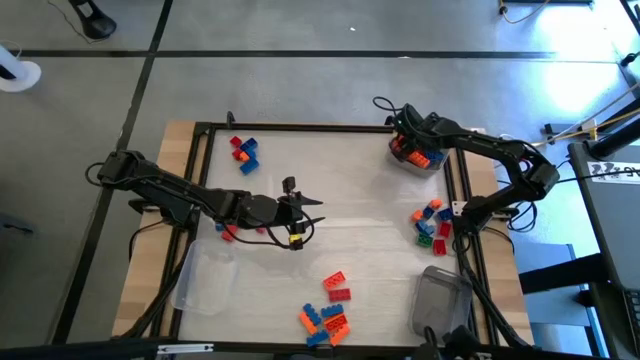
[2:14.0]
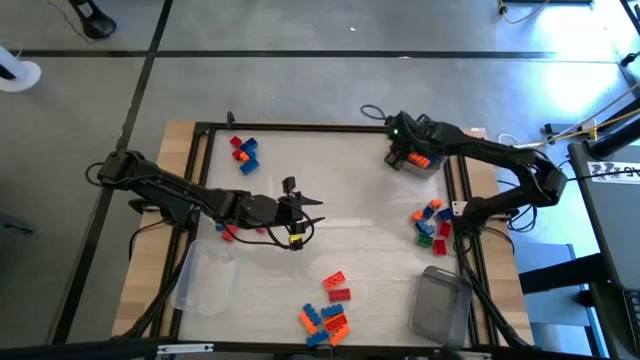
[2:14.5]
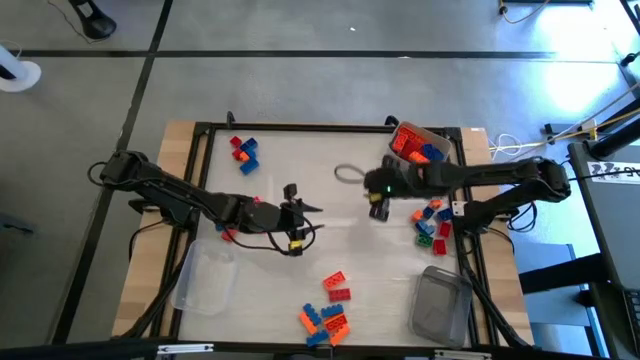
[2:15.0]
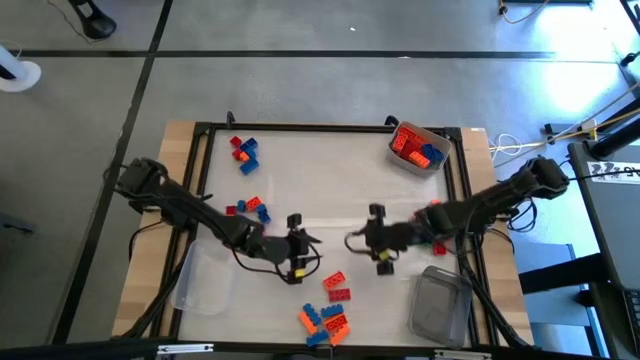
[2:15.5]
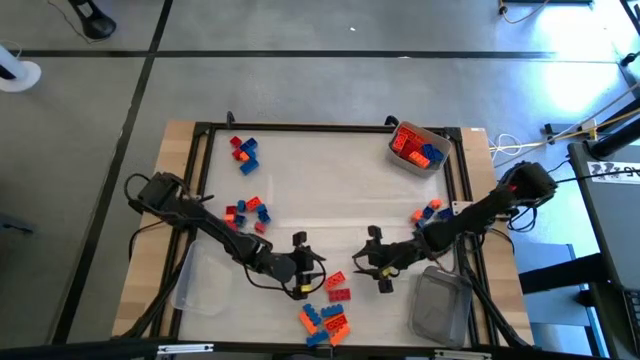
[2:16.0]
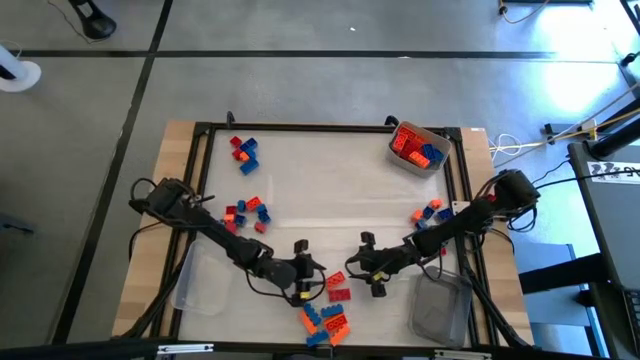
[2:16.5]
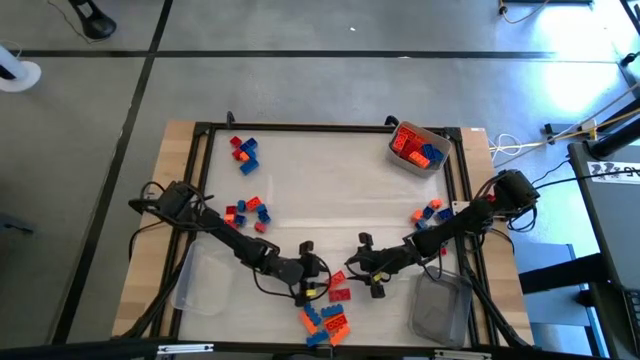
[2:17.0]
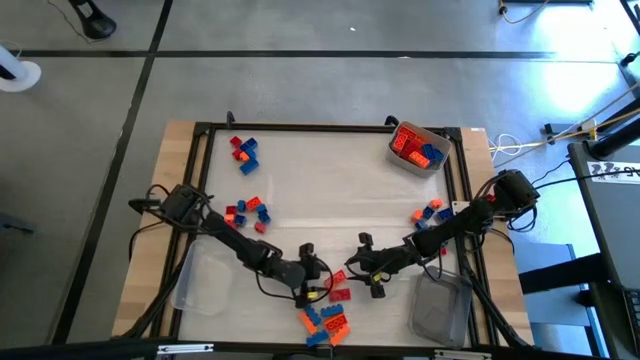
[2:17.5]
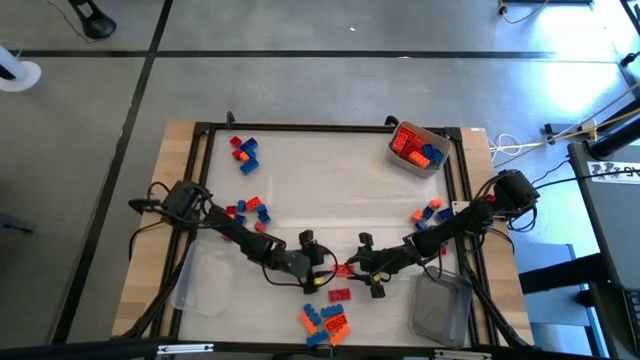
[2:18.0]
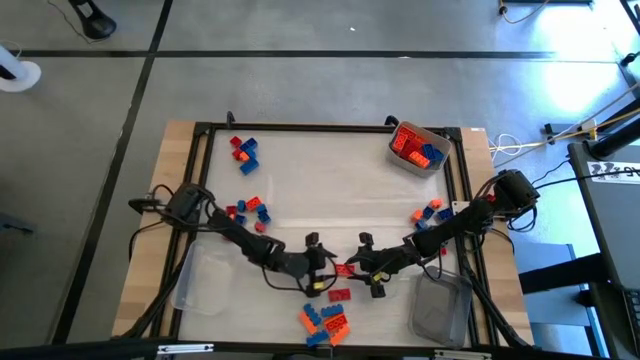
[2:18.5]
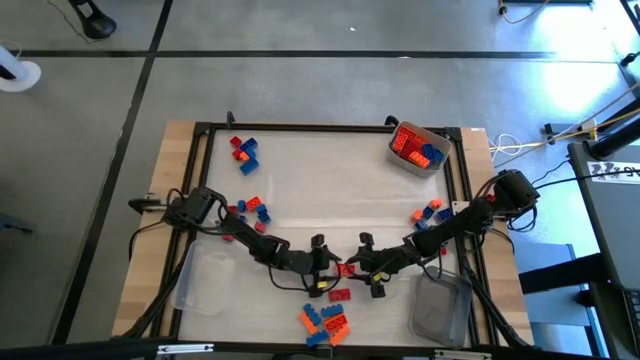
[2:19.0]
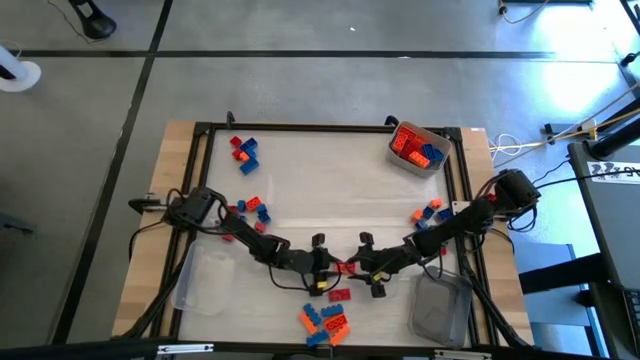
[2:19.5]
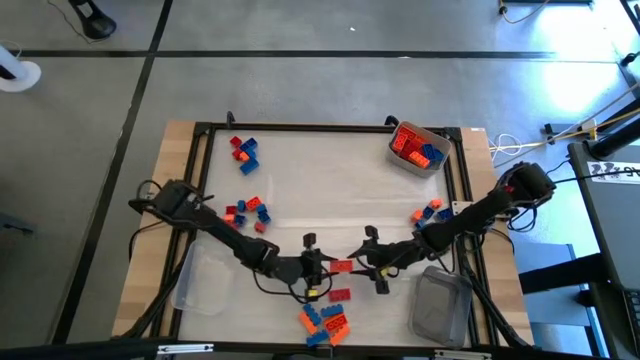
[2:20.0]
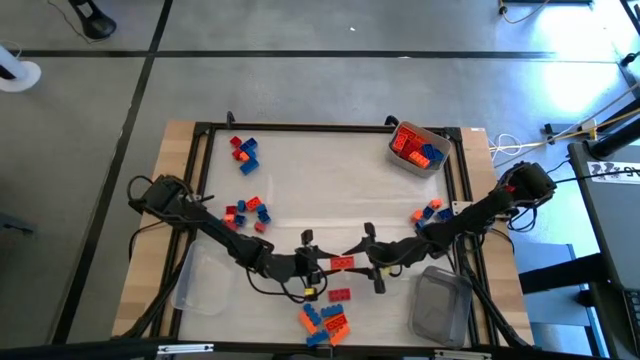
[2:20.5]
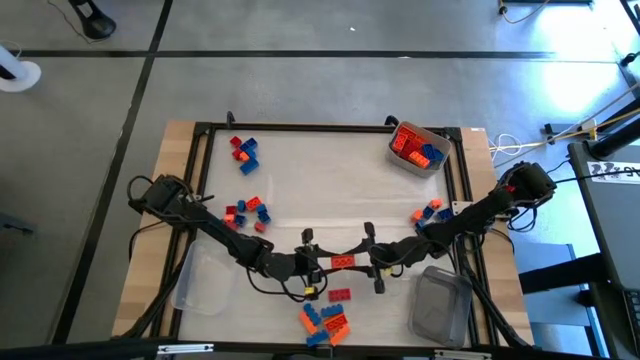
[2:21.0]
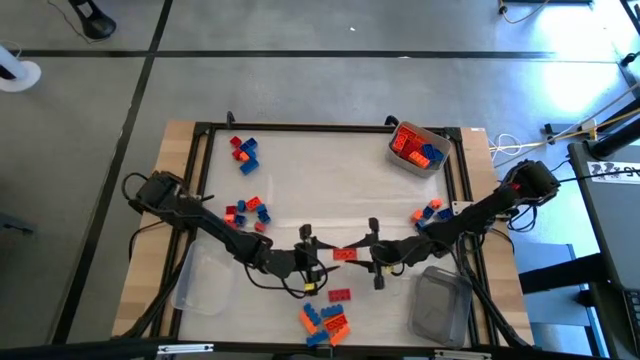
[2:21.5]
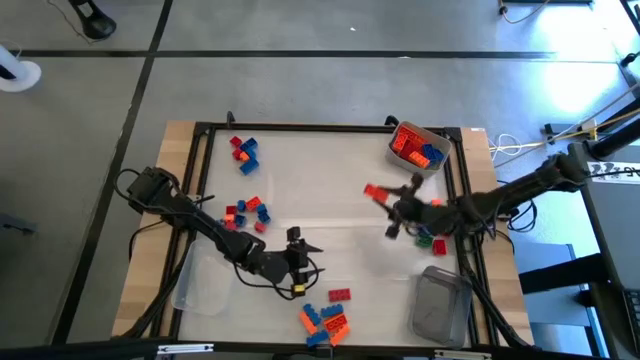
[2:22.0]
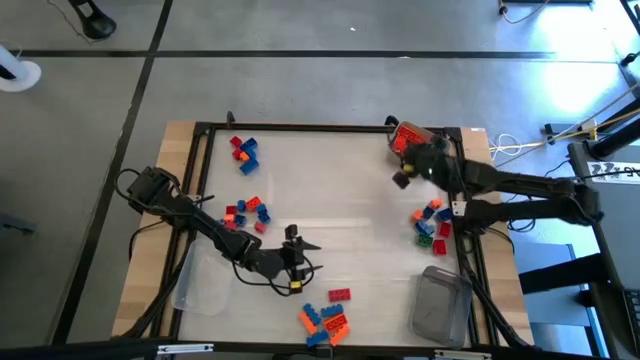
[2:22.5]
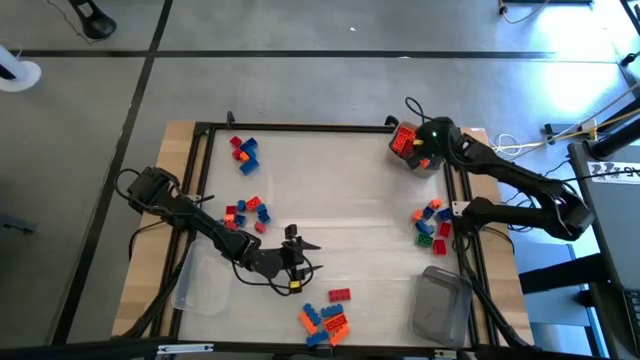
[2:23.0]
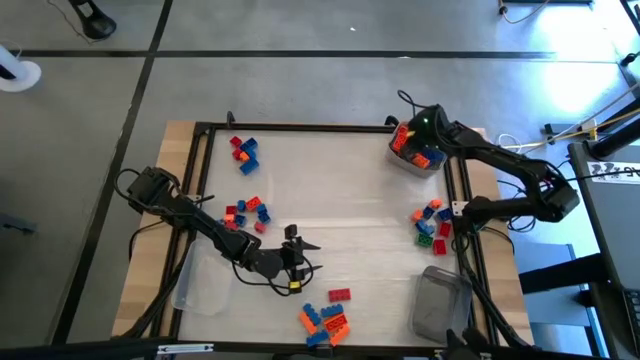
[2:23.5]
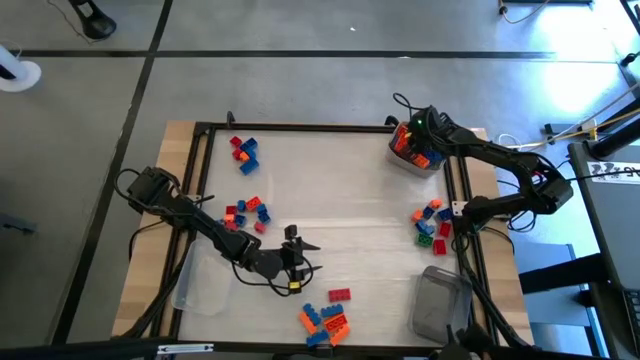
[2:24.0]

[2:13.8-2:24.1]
Task: Sort blocks by size
Put the orange game piece into the gray bin

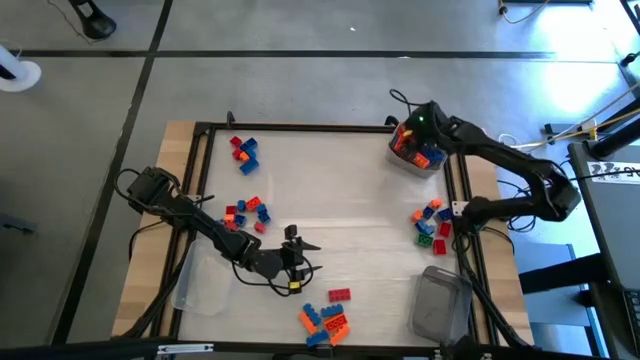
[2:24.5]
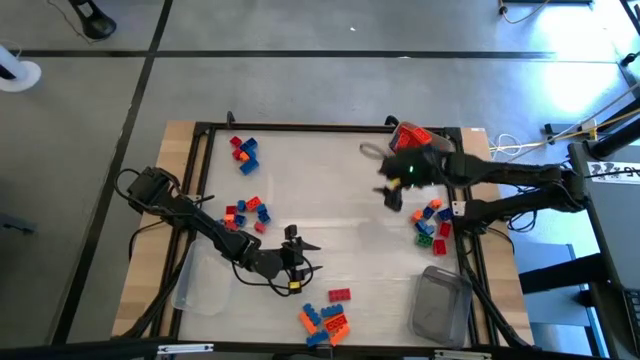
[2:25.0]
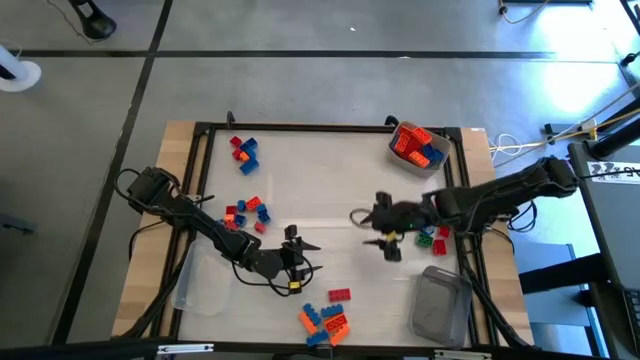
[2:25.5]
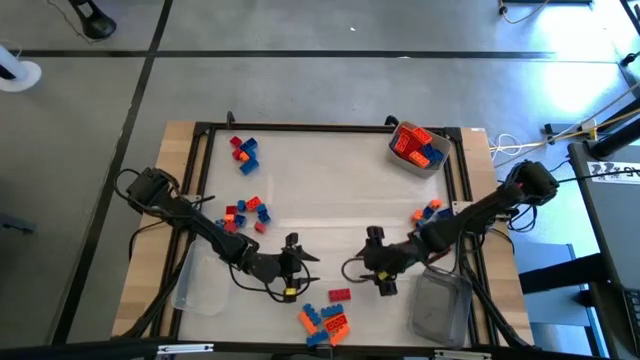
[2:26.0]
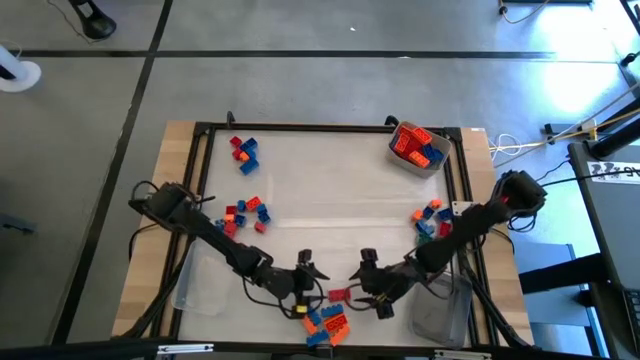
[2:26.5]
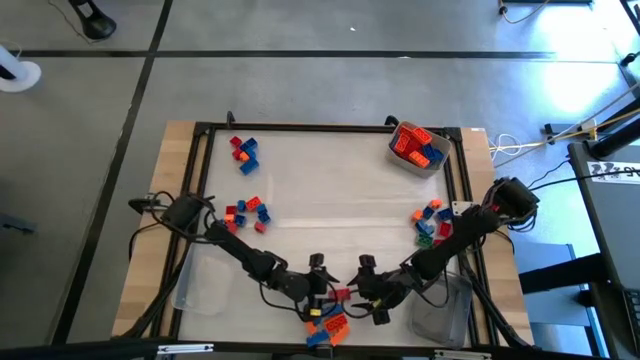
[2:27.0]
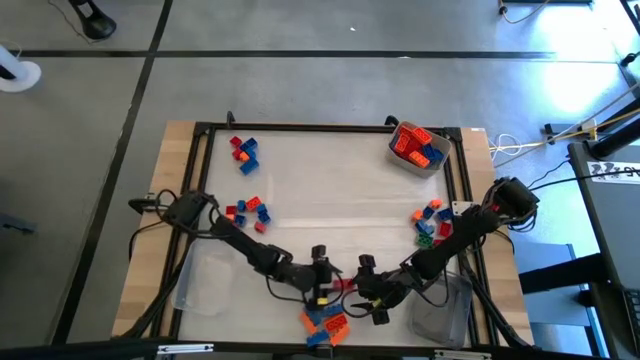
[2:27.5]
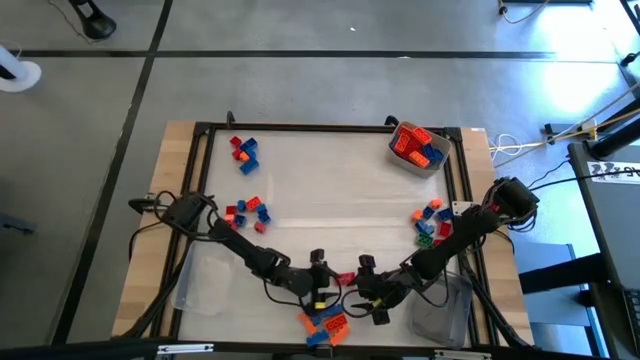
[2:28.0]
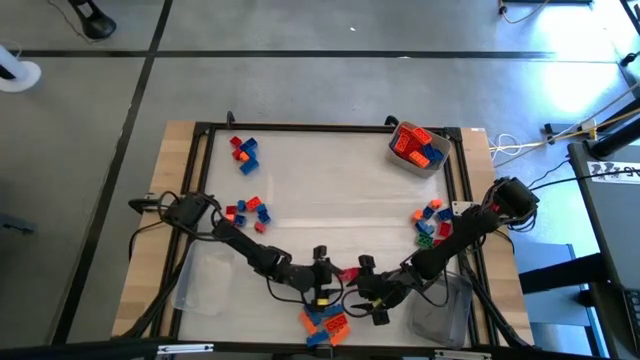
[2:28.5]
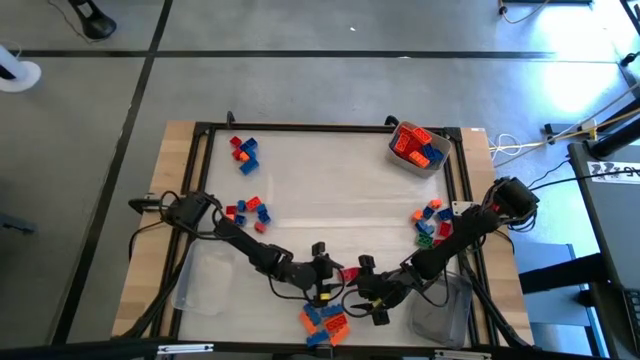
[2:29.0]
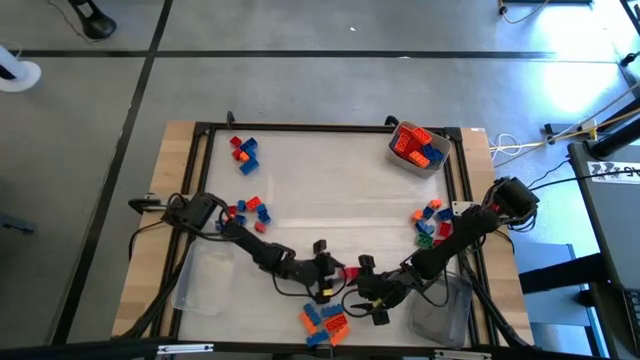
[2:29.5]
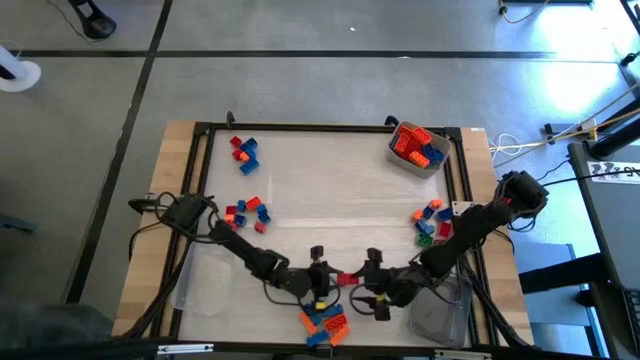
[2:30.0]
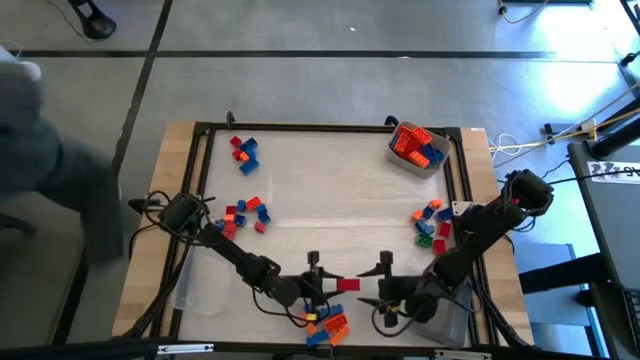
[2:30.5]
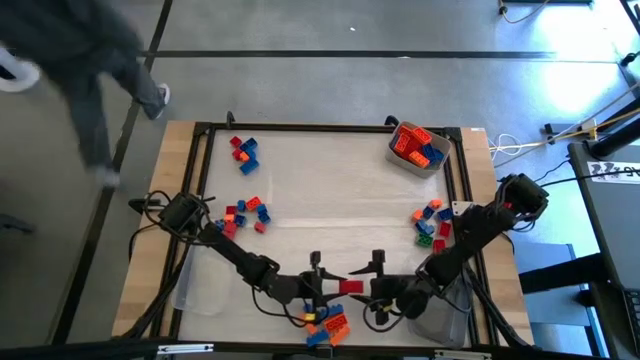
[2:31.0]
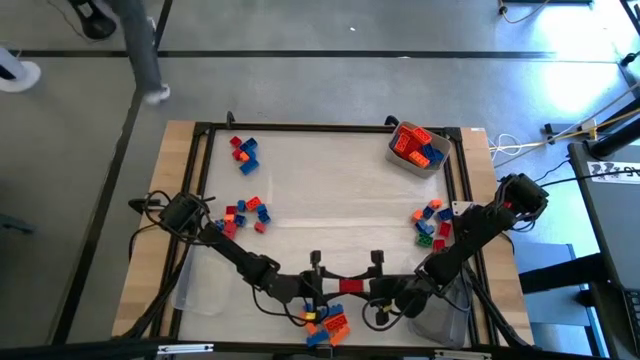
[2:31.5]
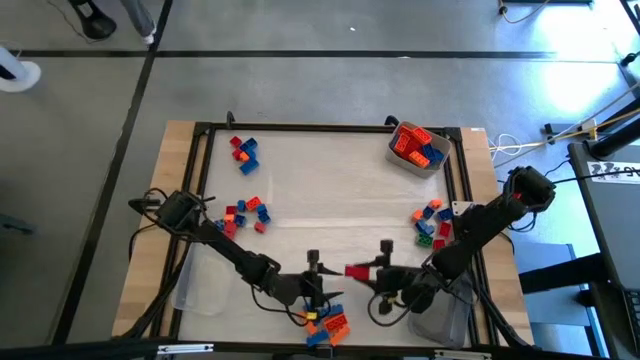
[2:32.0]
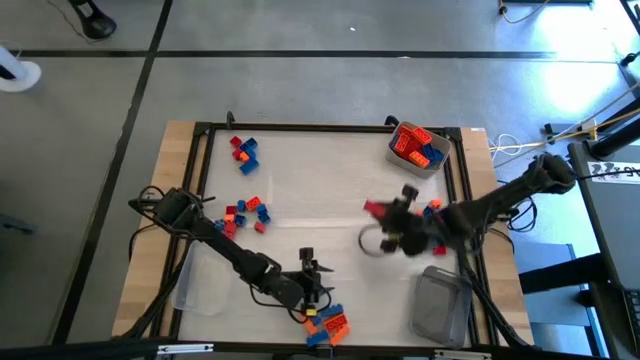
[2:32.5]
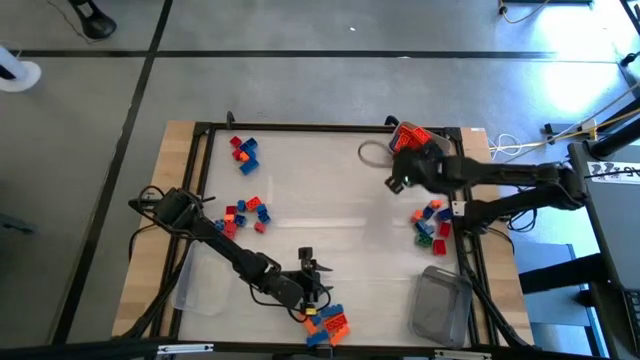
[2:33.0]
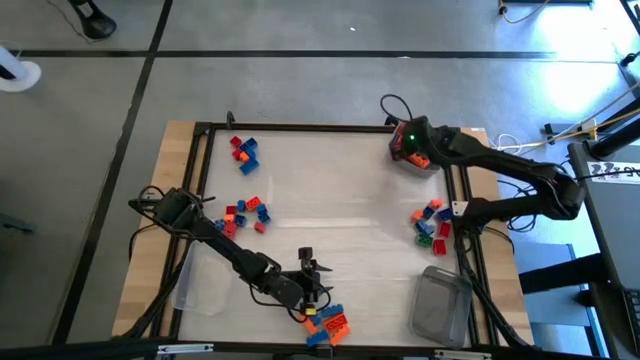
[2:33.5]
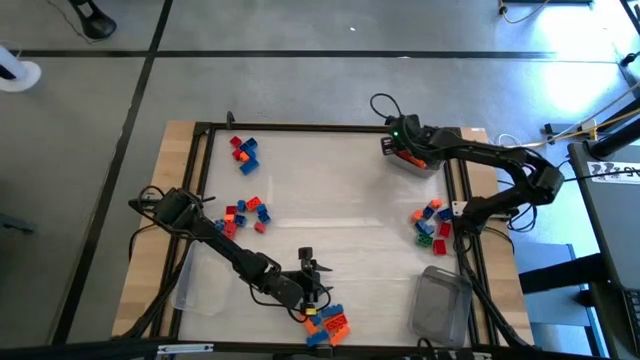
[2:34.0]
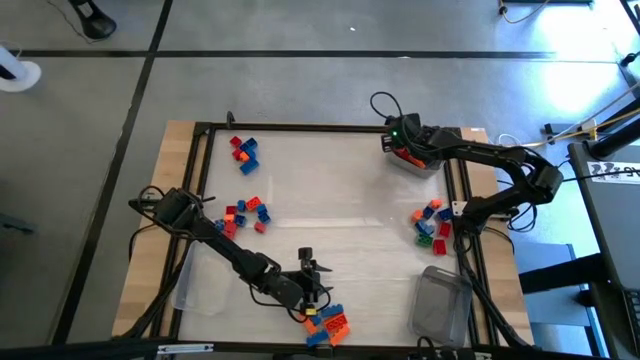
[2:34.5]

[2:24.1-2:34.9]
Put the red game piece into the gray bin
